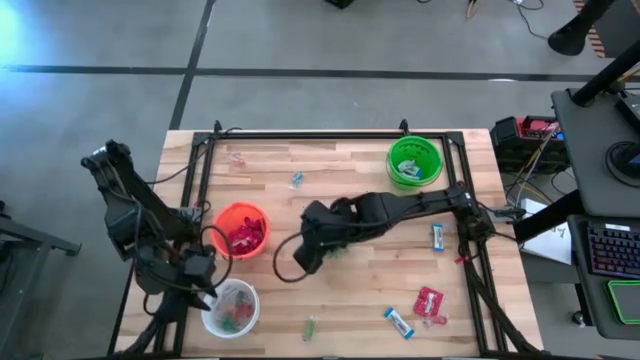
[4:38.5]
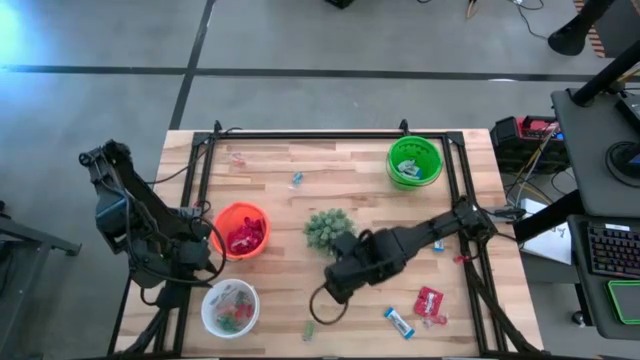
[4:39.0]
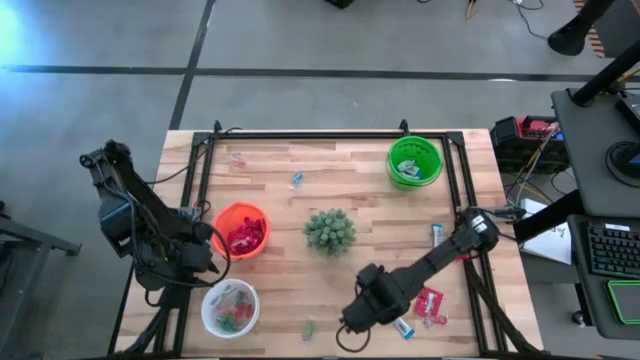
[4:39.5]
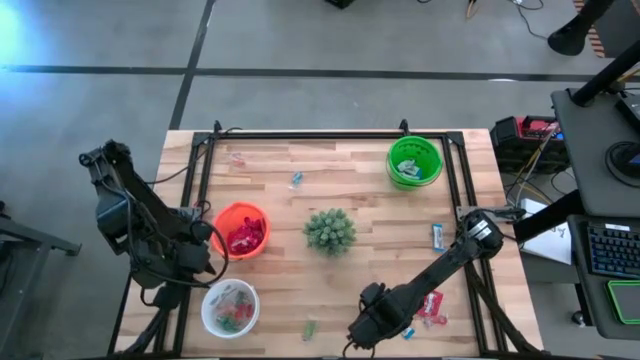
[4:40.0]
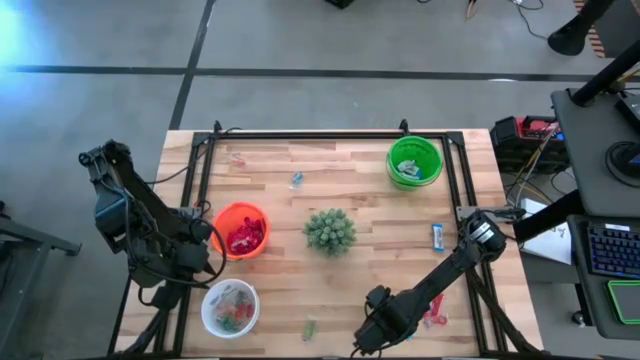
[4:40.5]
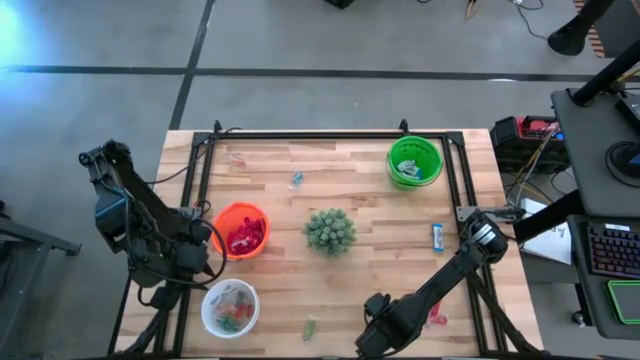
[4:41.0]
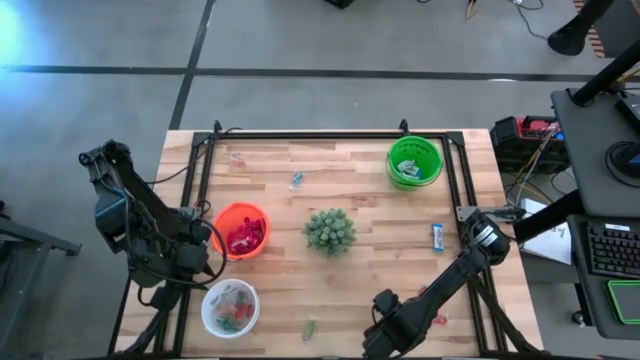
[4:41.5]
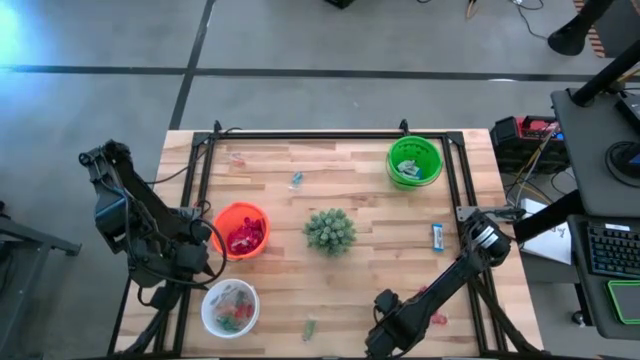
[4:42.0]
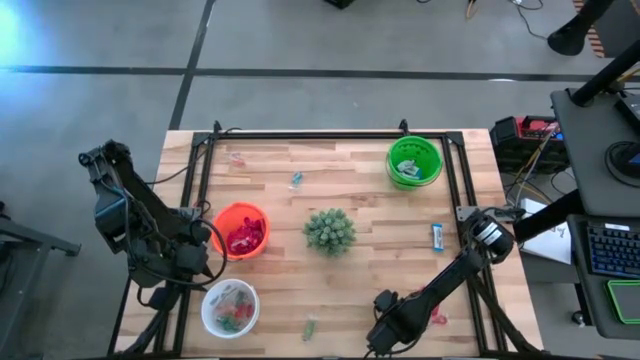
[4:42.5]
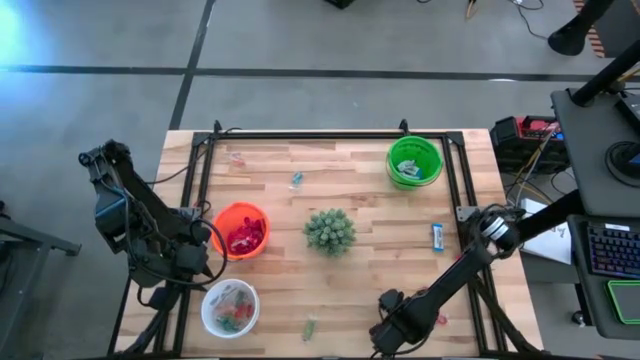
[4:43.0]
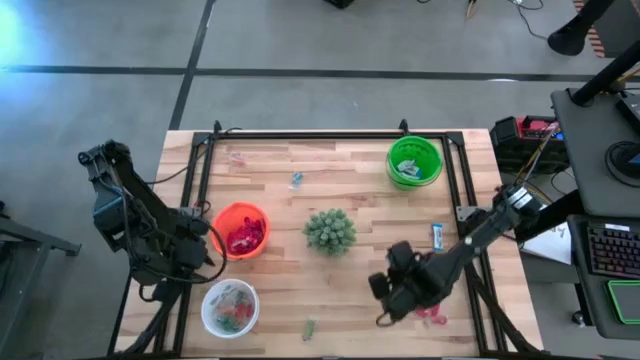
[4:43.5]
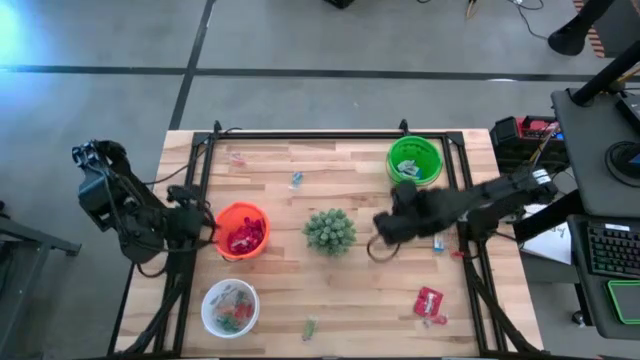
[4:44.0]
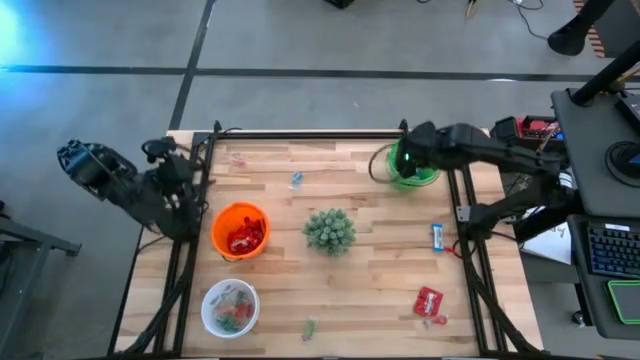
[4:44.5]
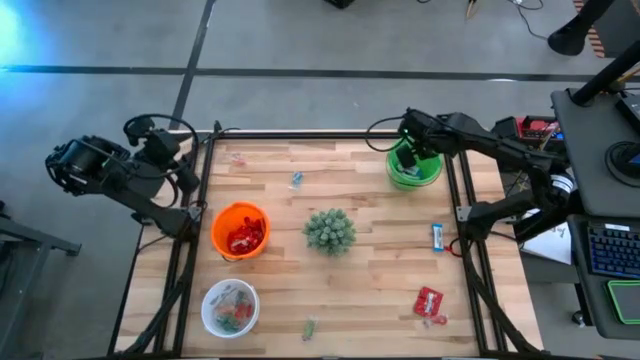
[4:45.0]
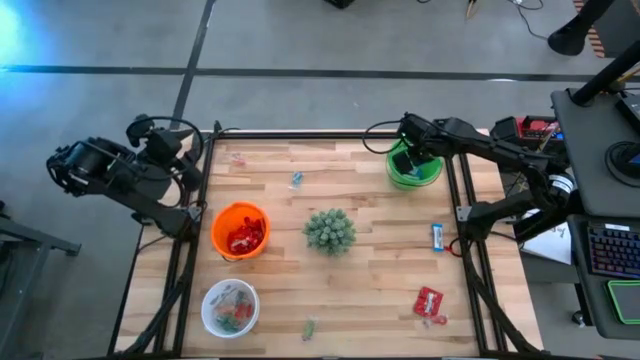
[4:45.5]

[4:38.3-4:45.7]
Task: Sort candy
Put the white chocolate into the green bucket

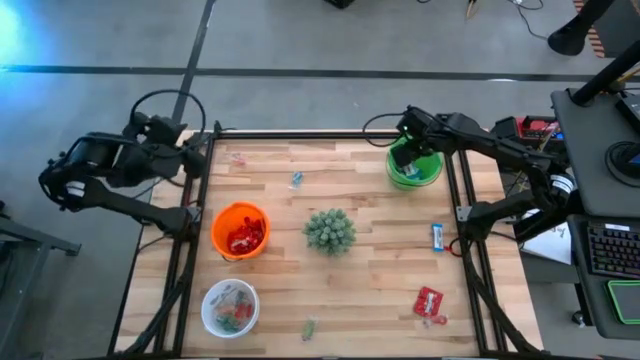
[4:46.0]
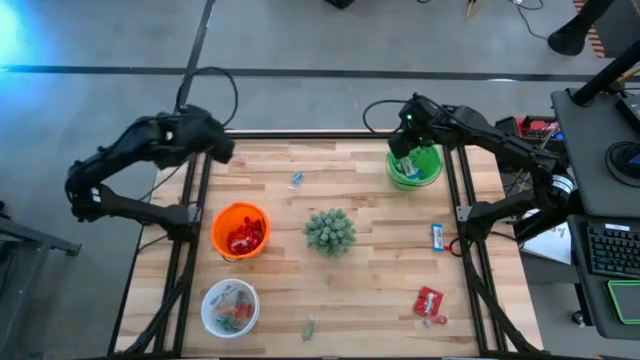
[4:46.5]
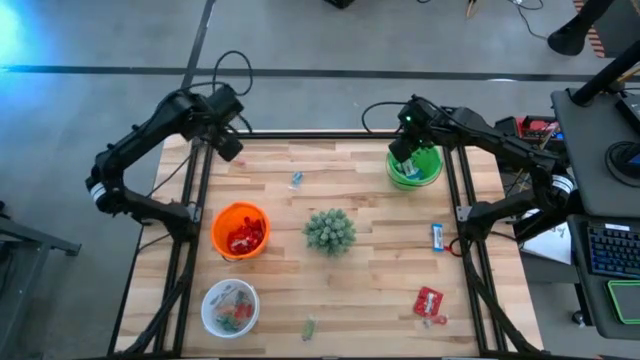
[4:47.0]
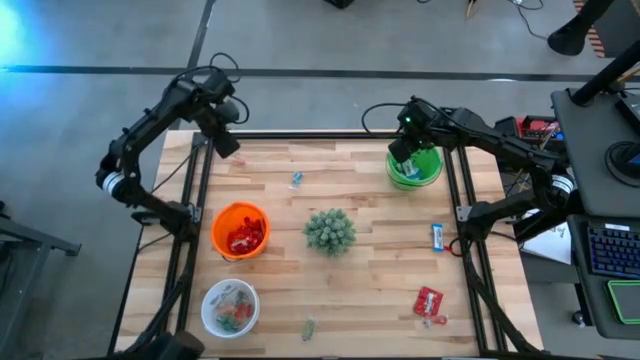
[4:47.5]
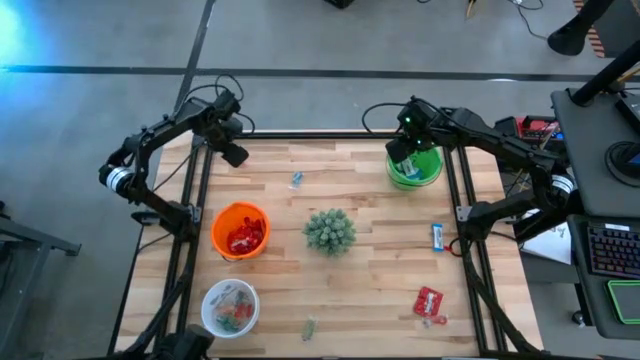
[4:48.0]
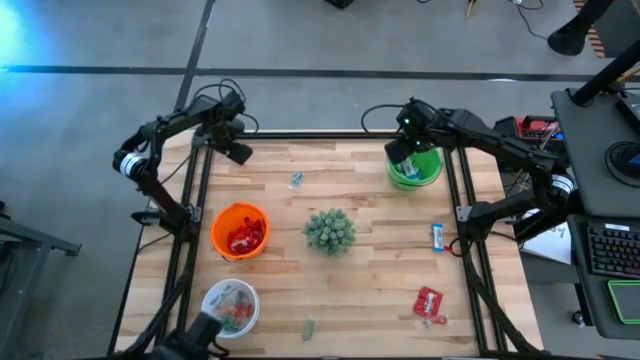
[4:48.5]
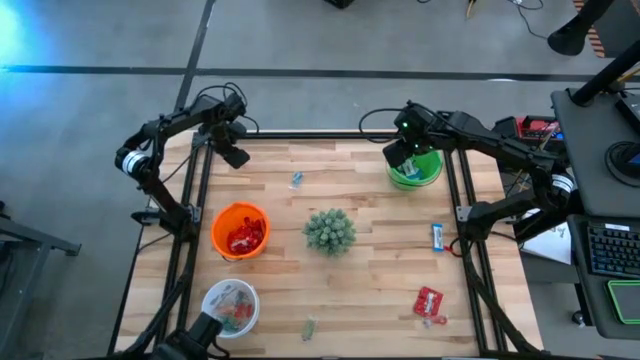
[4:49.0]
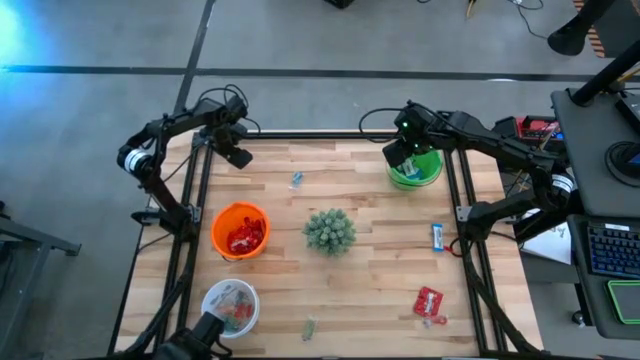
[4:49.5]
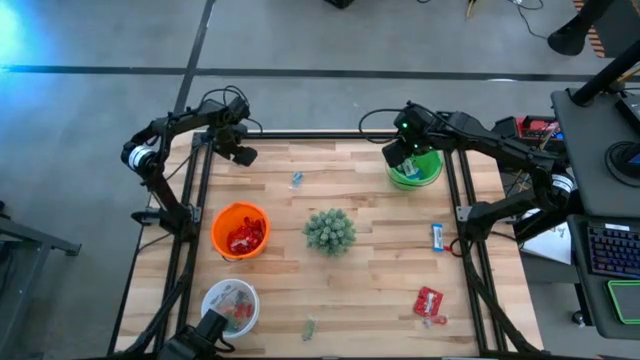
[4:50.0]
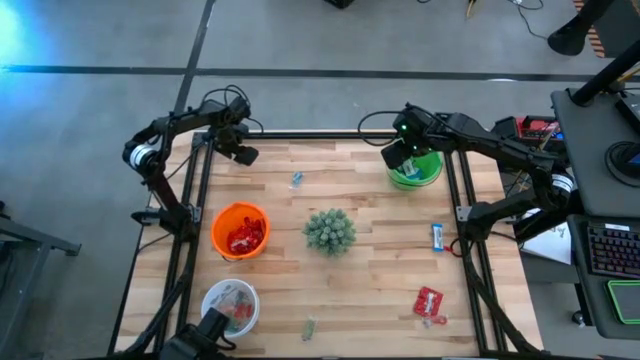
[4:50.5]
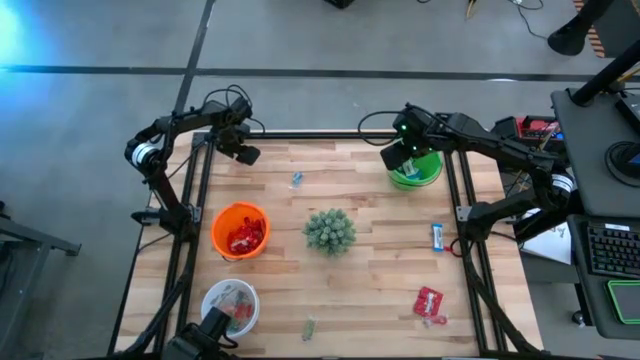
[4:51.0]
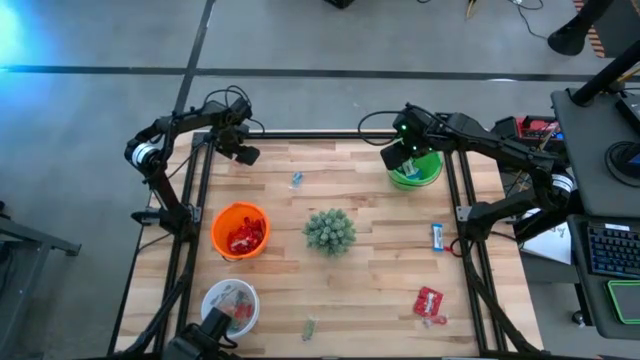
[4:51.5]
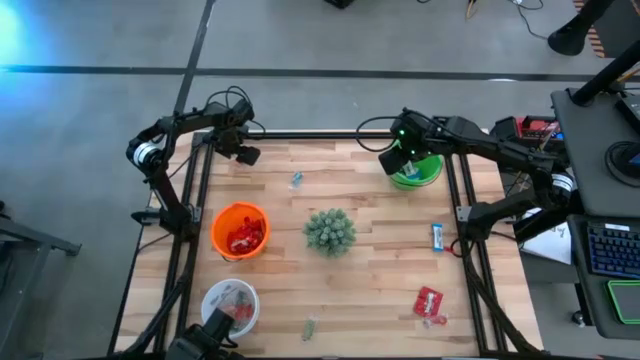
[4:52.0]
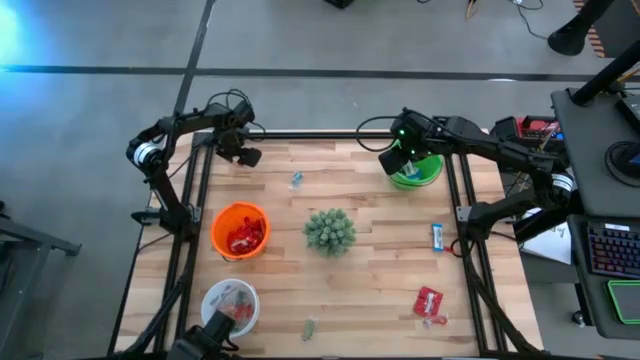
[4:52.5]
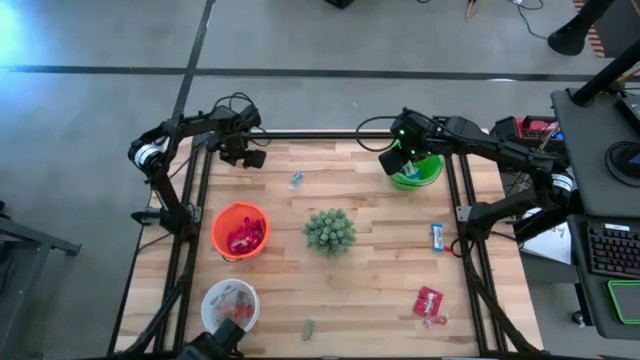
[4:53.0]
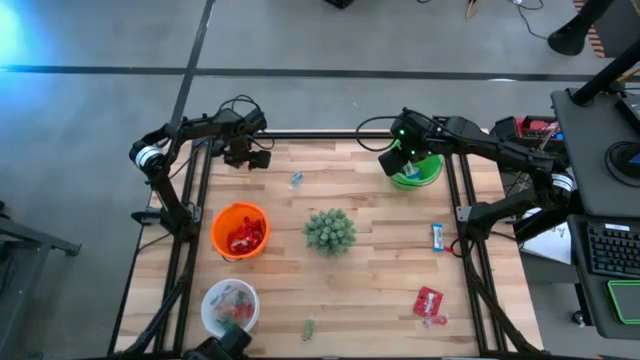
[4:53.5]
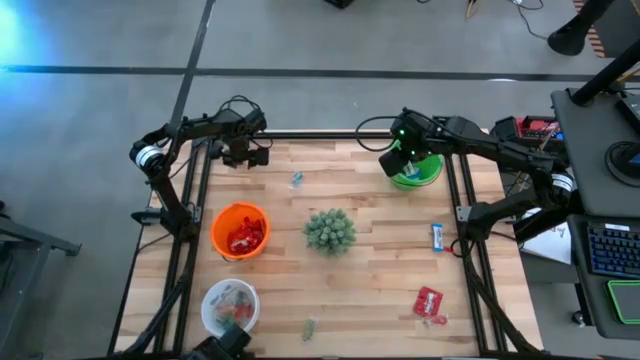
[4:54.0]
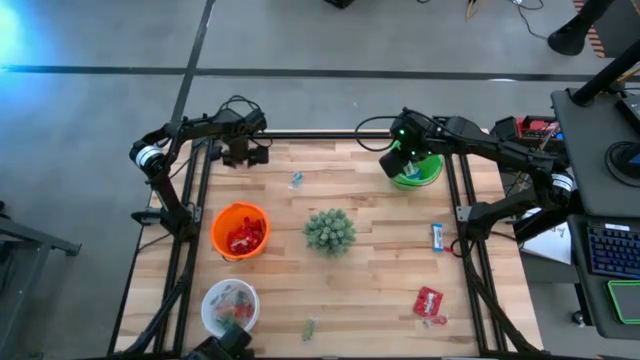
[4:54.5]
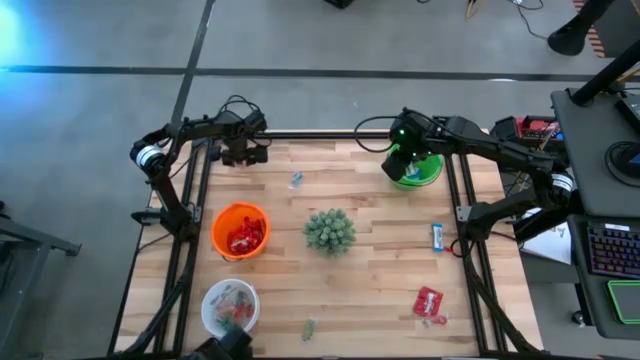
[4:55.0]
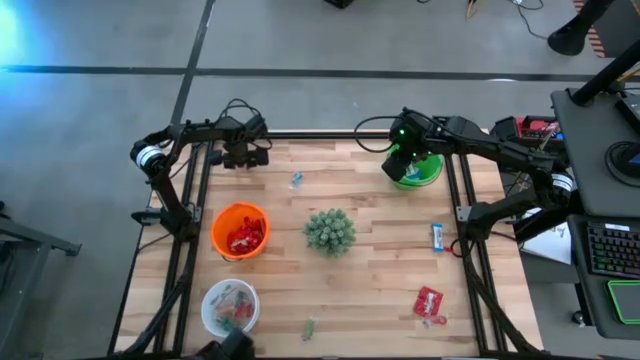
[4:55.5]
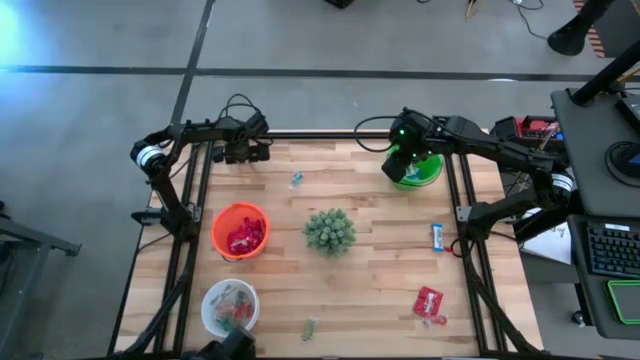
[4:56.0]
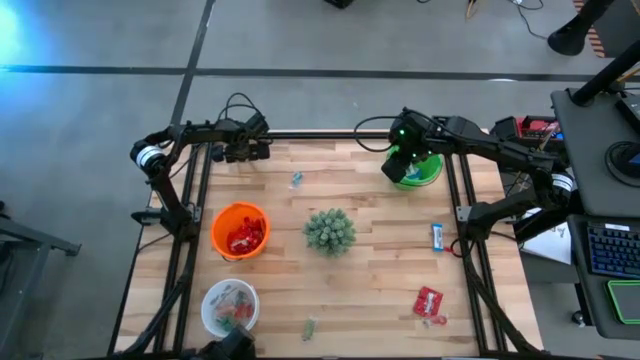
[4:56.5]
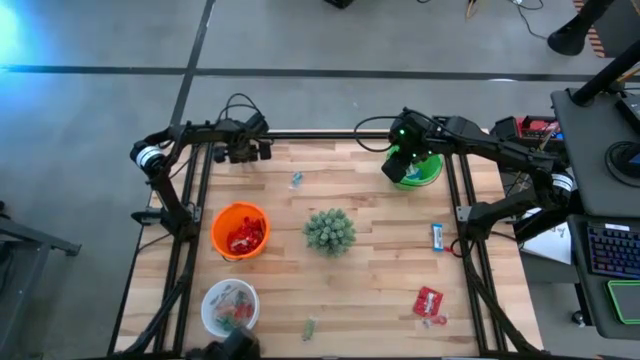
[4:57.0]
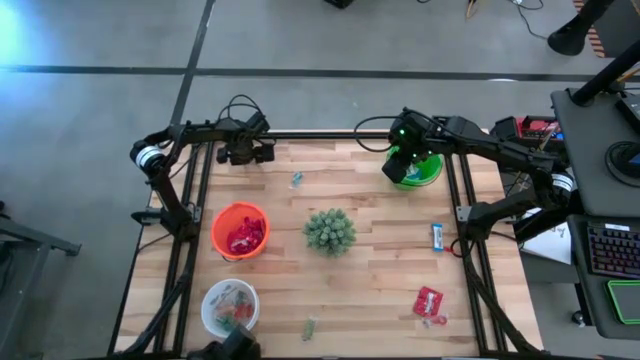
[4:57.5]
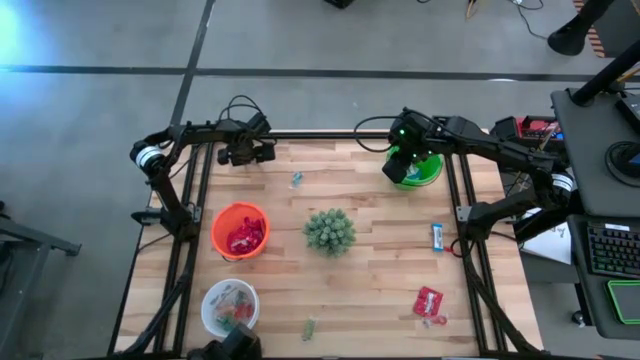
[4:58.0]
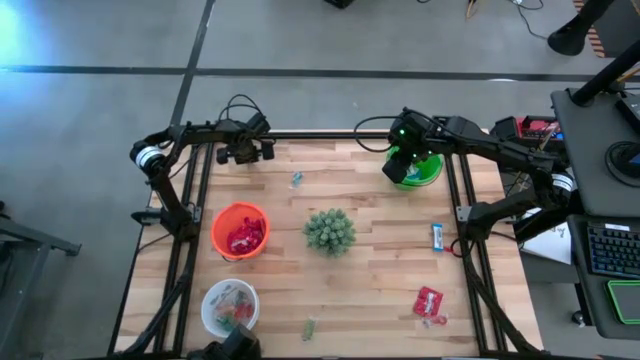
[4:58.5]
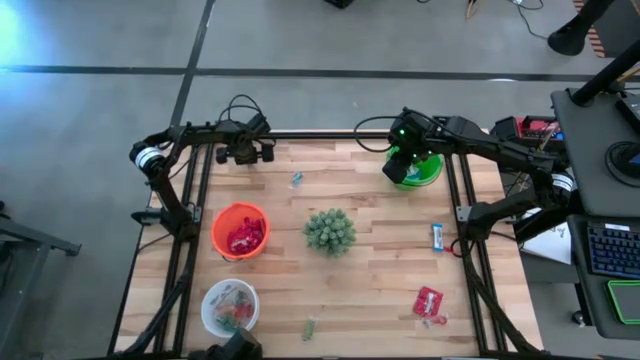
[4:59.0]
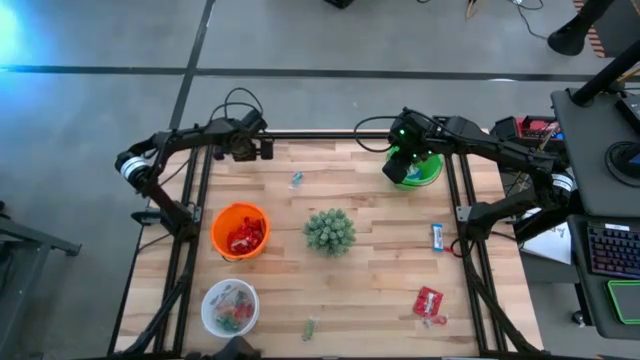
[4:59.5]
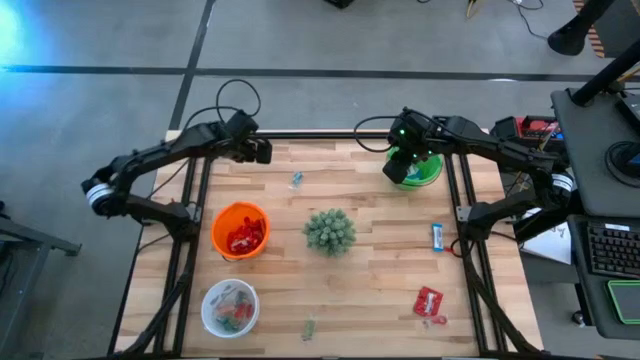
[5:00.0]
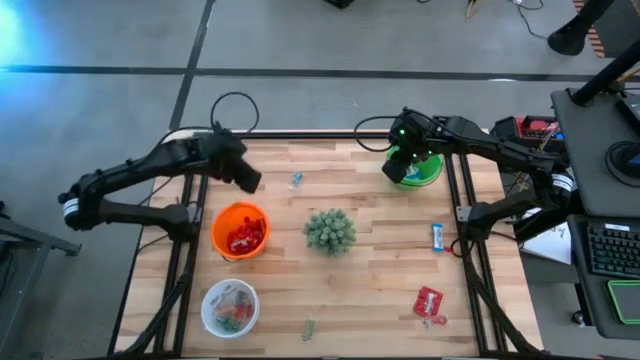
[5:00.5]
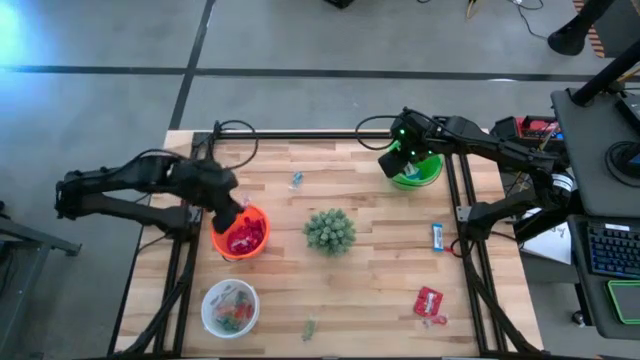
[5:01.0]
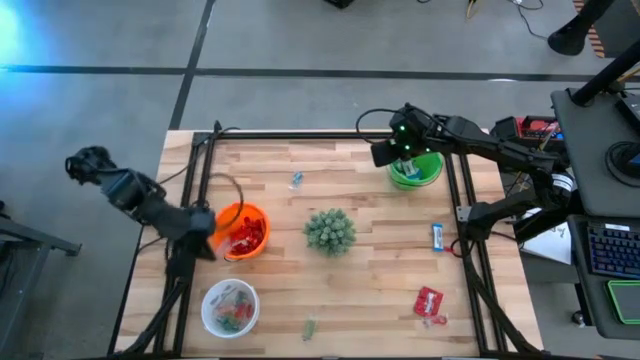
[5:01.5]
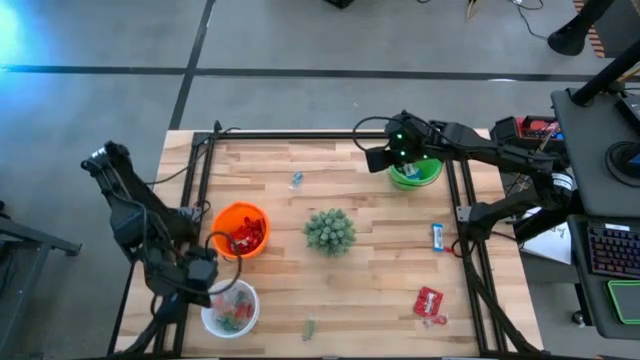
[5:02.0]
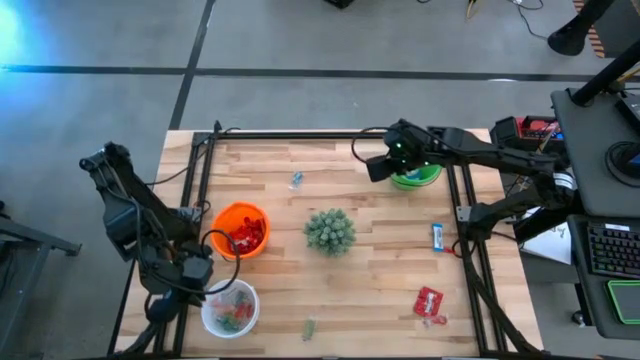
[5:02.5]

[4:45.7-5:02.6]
Put the orange gummy into the white bucket
